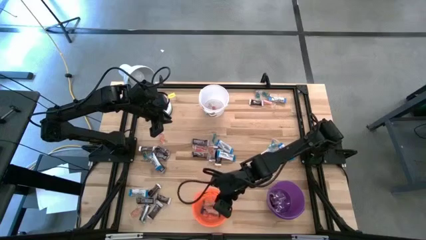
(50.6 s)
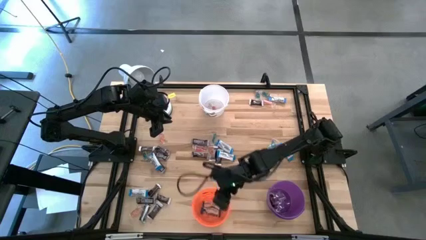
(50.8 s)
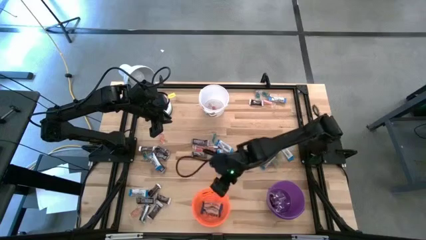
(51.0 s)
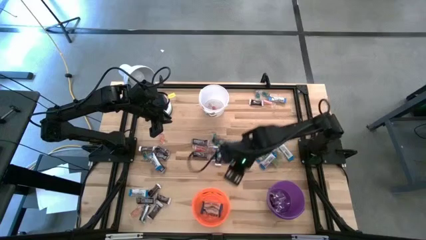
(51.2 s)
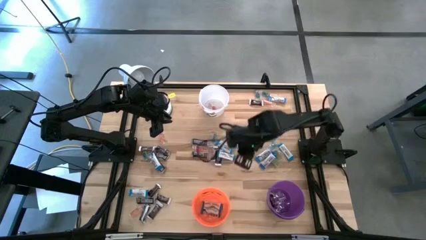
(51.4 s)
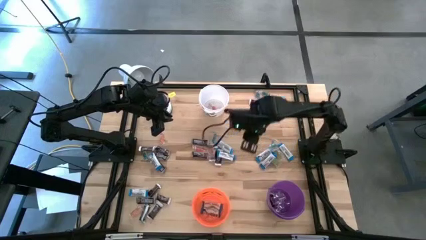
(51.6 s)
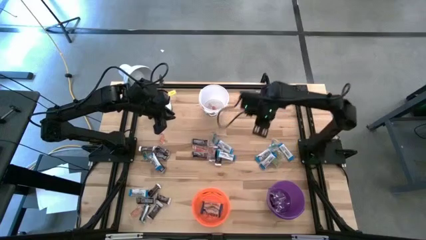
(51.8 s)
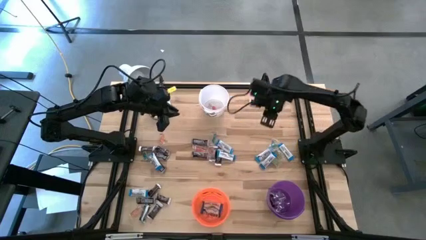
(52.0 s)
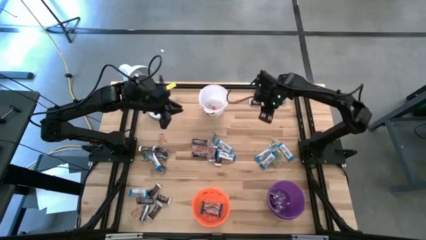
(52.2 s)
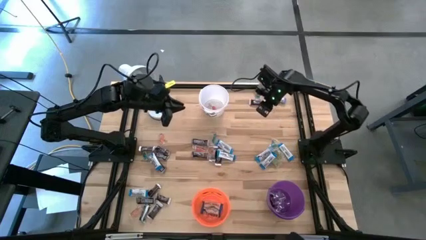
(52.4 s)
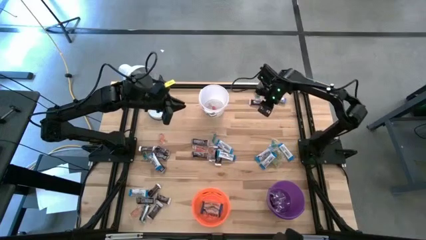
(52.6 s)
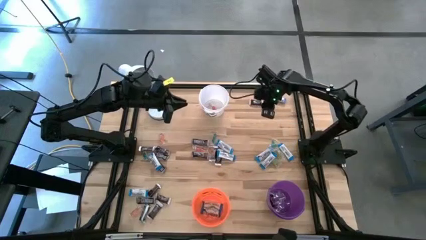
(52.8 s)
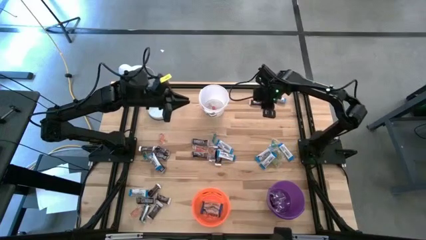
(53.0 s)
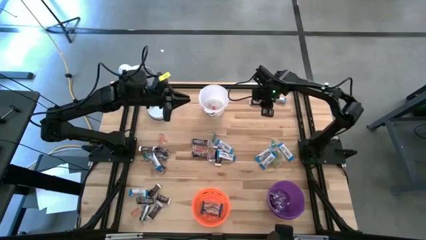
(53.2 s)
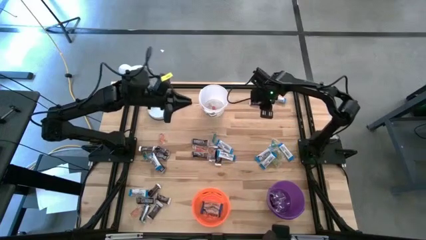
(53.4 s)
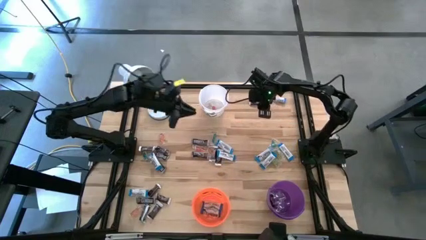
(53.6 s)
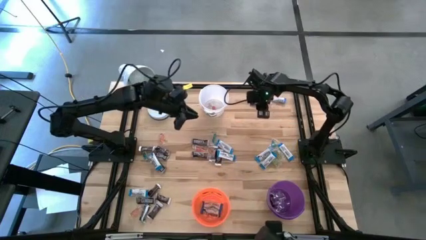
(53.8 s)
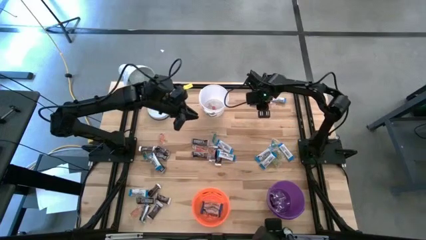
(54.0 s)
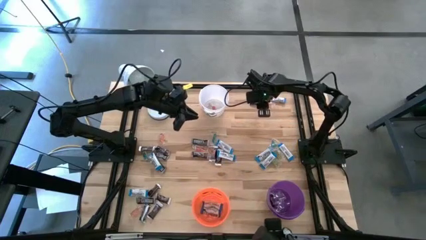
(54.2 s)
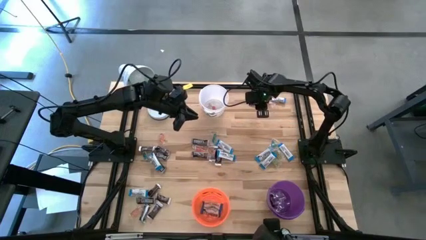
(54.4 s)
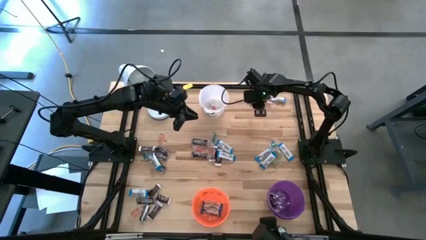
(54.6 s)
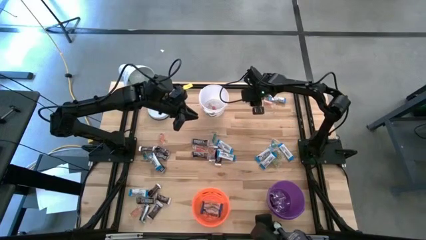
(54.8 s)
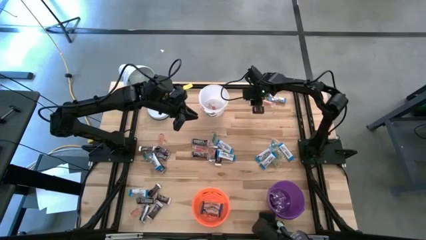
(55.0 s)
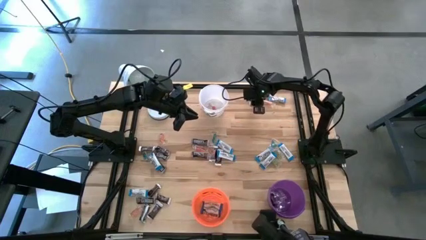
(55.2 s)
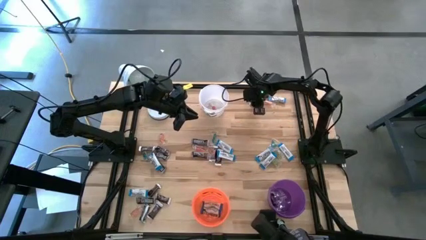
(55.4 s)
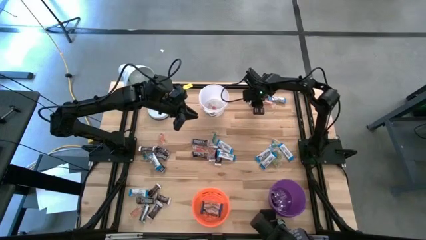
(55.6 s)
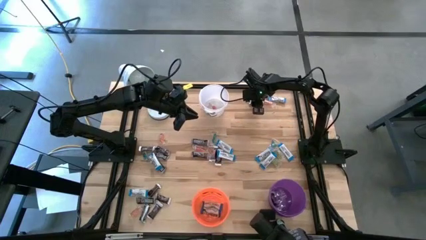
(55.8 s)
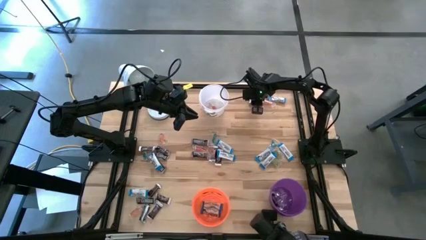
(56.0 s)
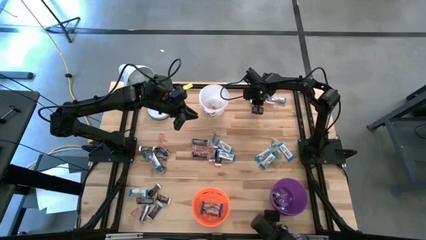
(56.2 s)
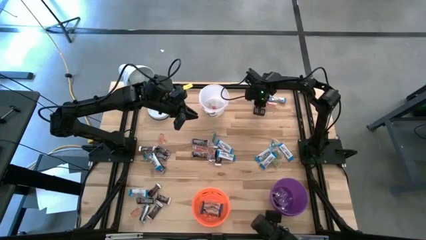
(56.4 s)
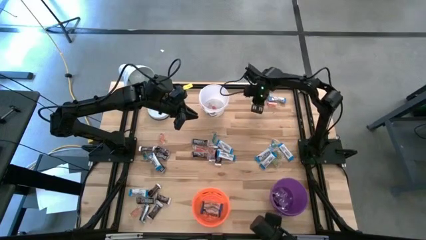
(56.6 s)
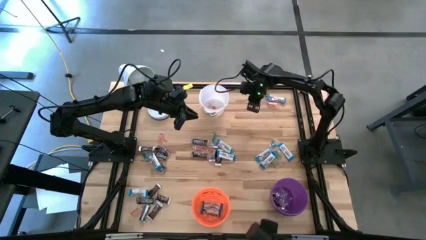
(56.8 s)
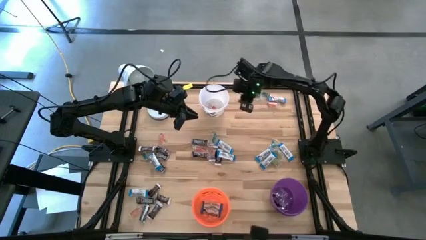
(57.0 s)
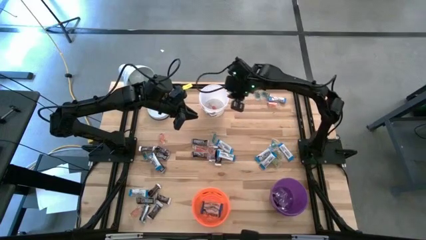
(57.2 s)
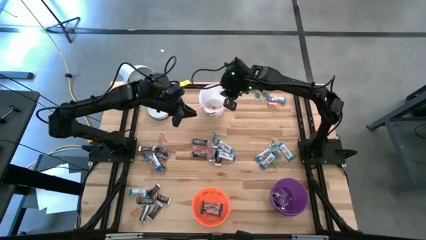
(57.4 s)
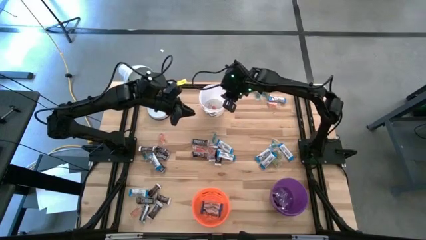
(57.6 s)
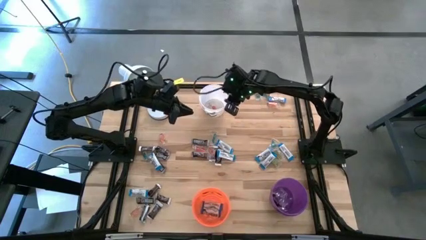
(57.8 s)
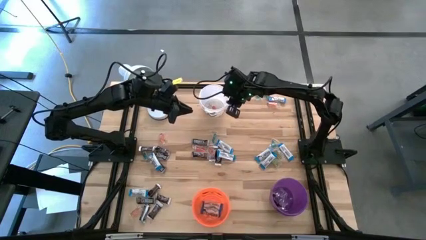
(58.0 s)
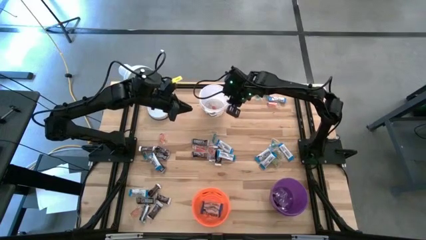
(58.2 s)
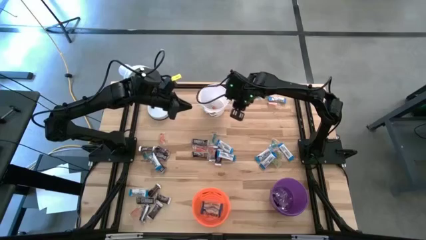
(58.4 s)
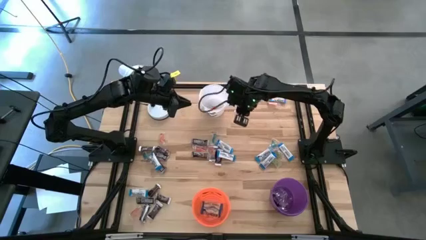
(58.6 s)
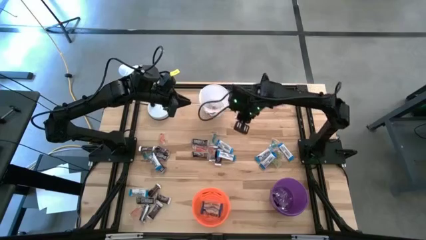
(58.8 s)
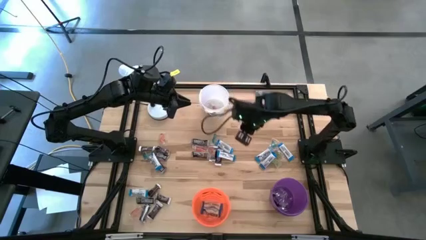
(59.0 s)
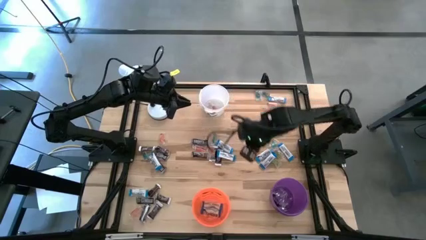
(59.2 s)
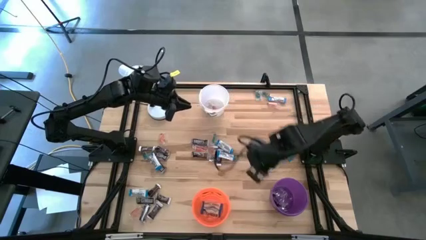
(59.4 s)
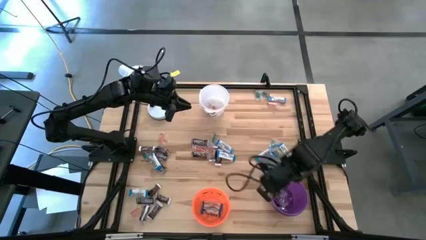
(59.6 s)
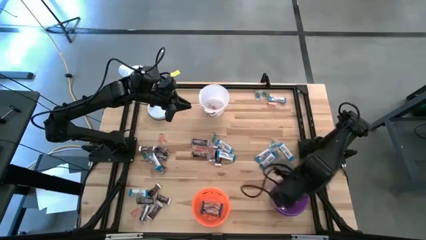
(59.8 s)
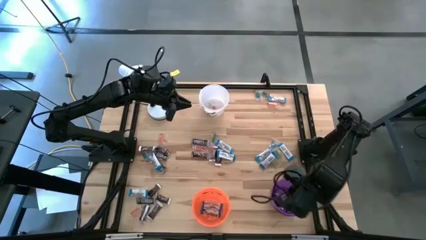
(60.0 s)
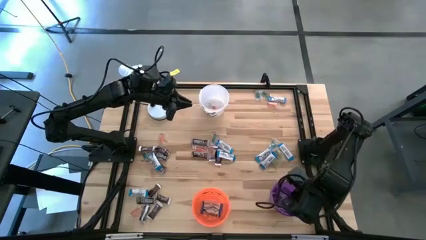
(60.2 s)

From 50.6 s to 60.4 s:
Task: Organize candy in baskets
Put the dark brown chocolate bar into the dark purple bucket

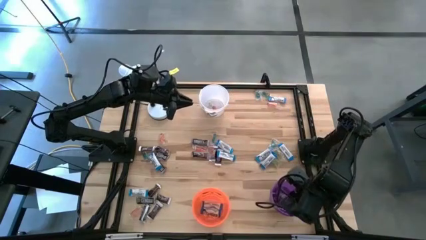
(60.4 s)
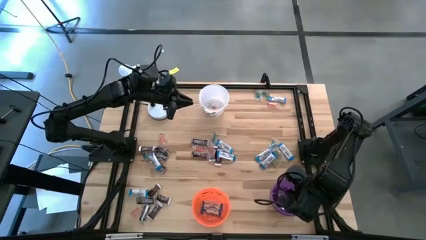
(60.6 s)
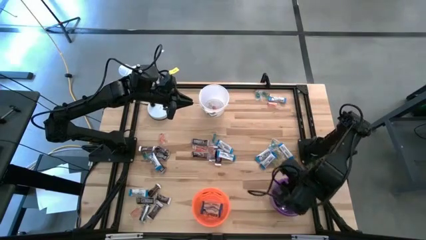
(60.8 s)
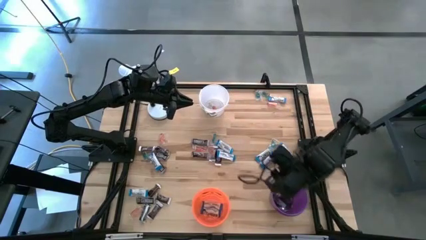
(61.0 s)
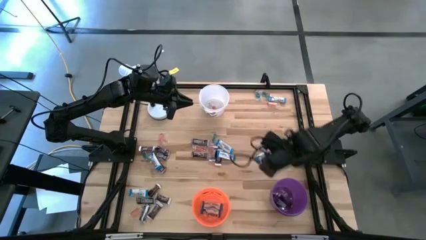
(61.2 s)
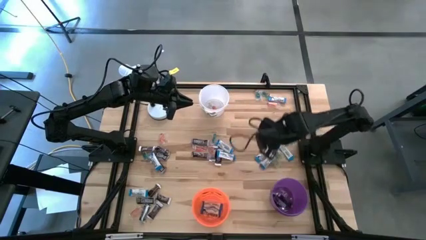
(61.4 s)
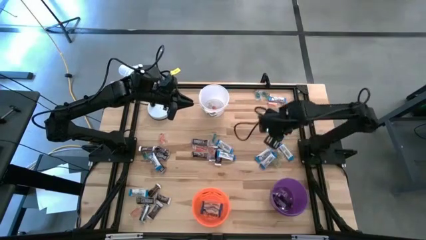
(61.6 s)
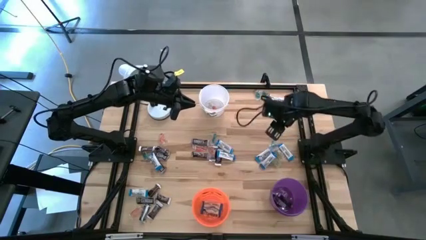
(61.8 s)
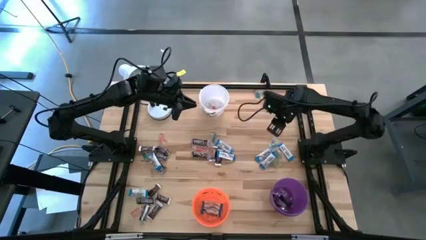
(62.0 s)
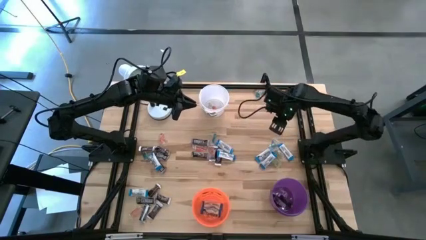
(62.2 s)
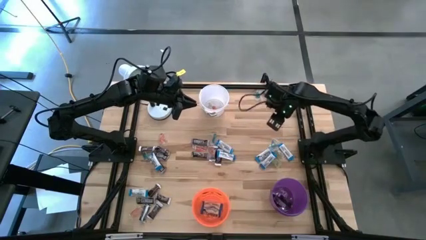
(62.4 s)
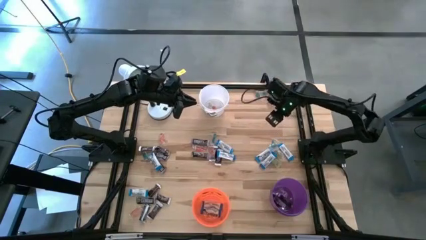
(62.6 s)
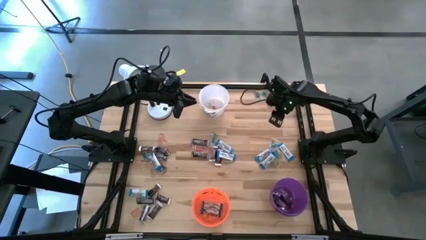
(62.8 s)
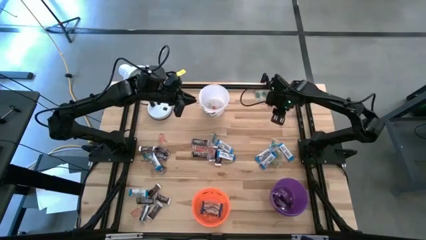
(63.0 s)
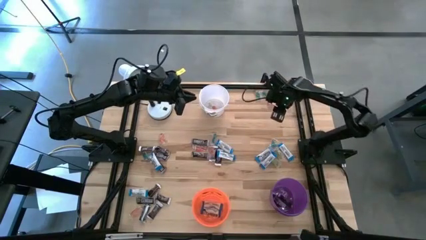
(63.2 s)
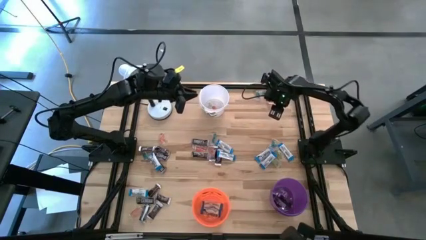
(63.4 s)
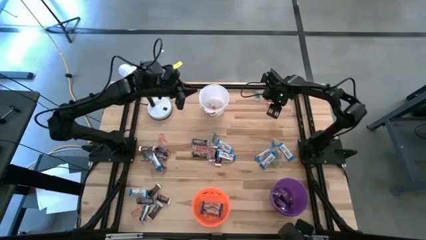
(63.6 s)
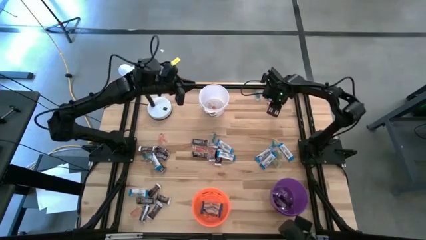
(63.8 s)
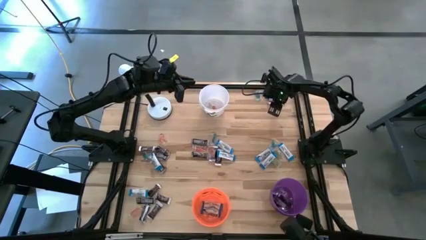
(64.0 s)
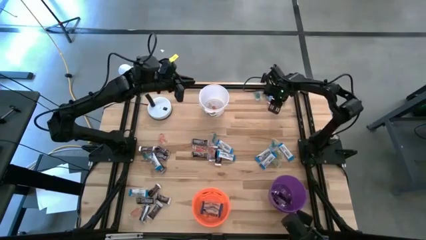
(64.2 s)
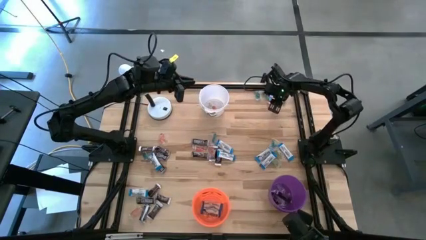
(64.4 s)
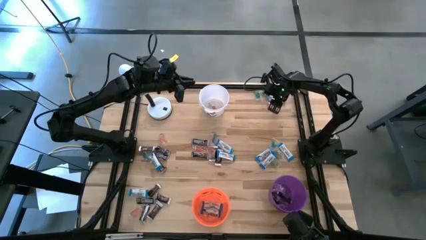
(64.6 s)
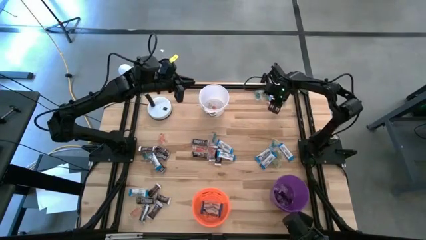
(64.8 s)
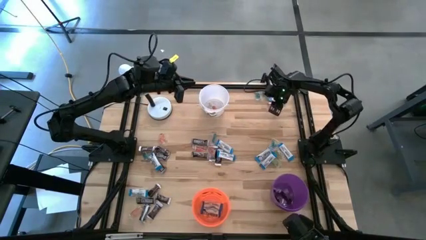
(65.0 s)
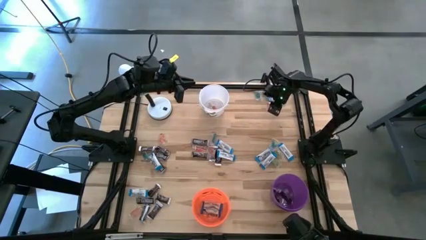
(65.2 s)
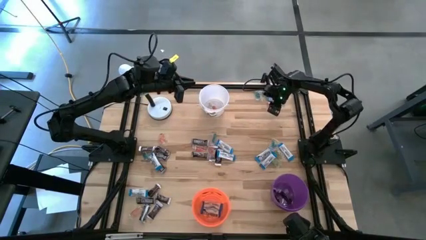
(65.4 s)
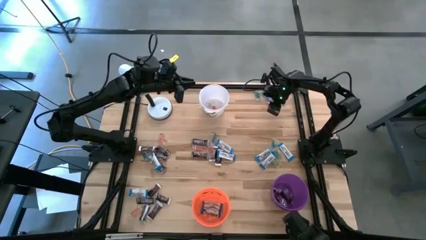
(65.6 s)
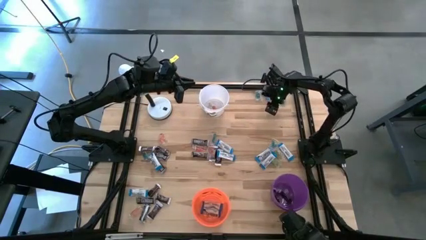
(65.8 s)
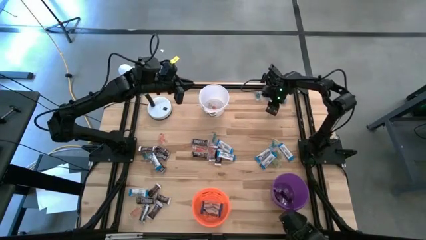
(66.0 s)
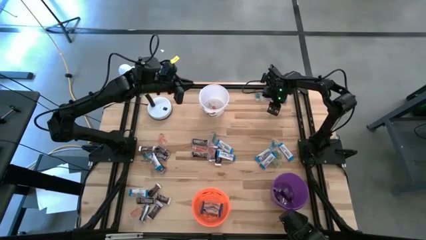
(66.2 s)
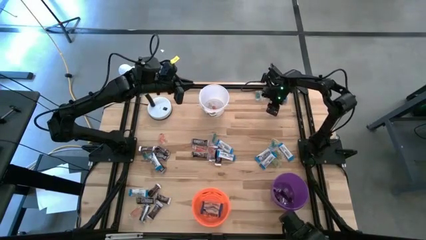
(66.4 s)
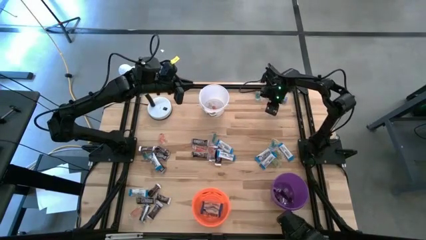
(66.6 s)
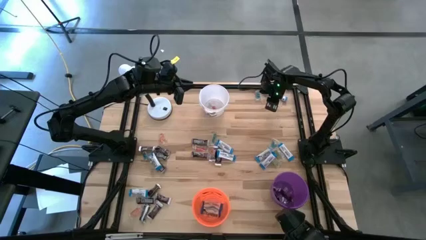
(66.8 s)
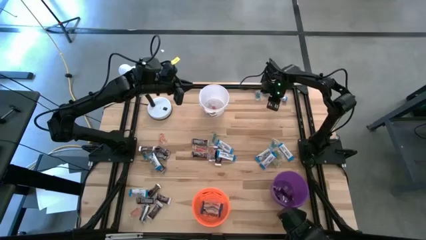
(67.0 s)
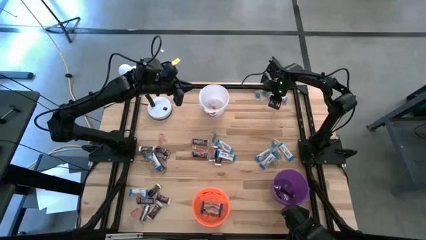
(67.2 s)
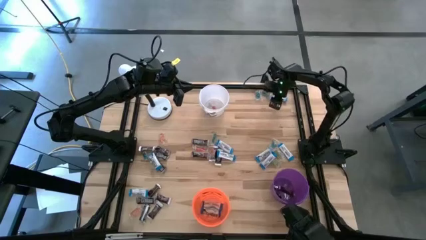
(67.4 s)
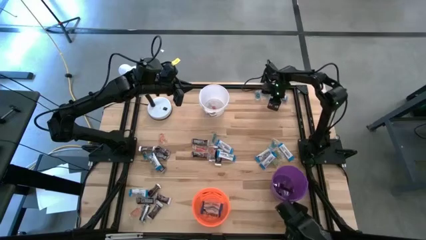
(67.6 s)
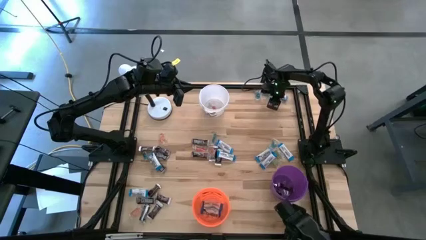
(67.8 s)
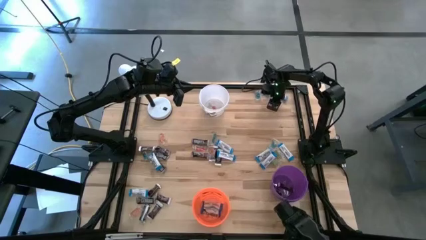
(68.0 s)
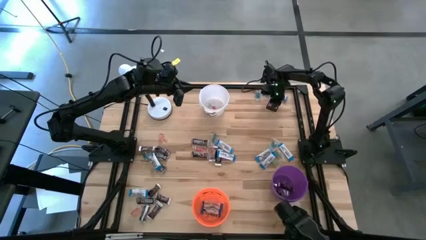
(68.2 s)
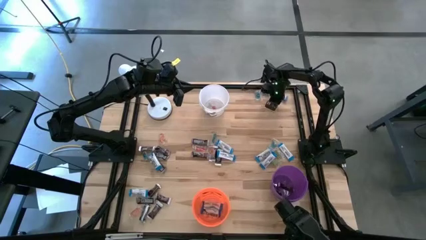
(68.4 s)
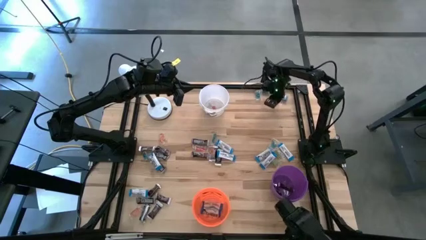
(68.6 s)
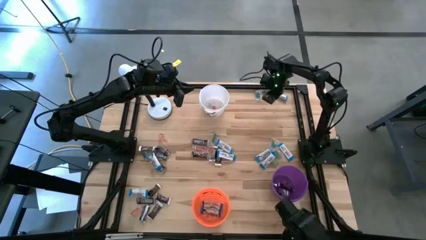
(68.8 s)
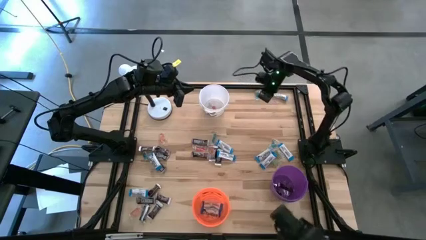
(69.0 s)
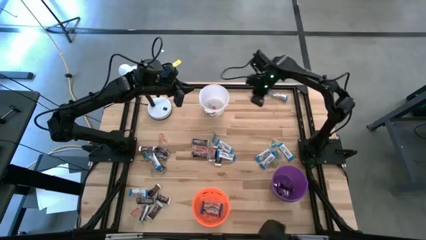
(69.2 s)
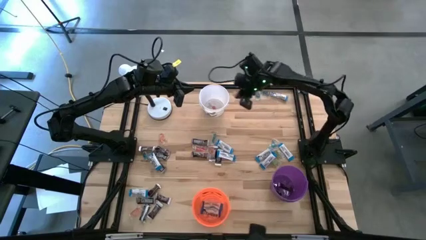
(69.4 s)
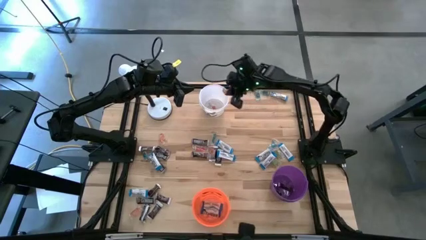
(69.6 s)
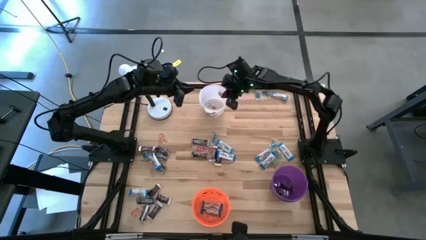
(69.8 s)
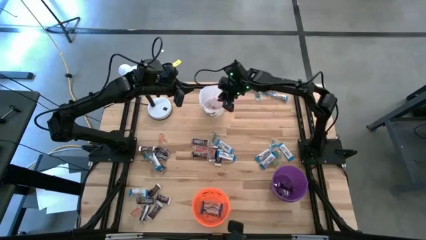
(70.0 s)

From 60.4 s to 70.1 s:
Put the orange gummy into the white bucket
